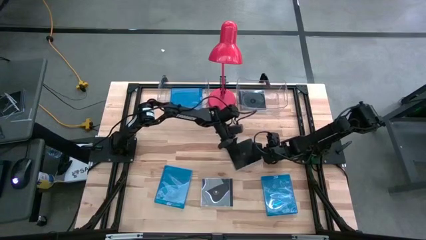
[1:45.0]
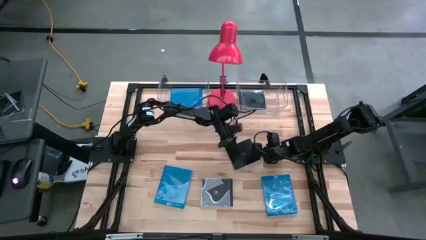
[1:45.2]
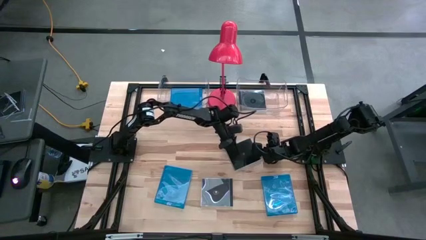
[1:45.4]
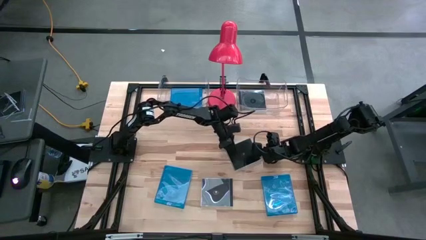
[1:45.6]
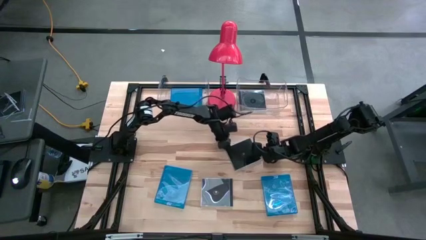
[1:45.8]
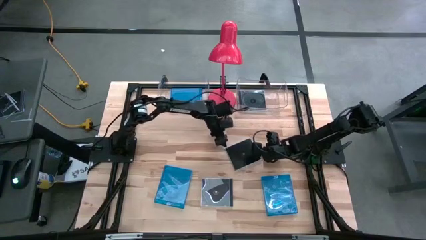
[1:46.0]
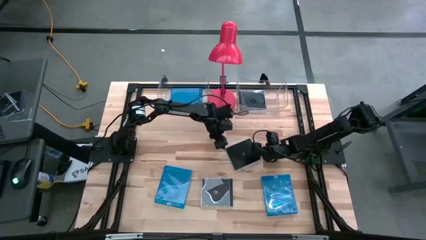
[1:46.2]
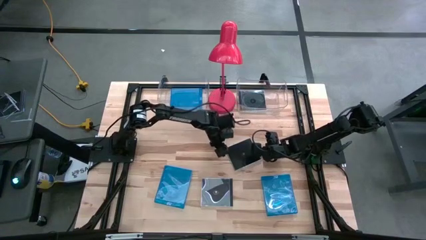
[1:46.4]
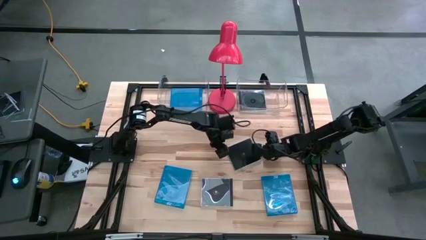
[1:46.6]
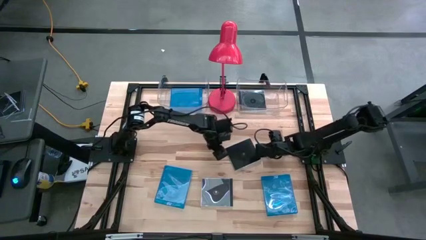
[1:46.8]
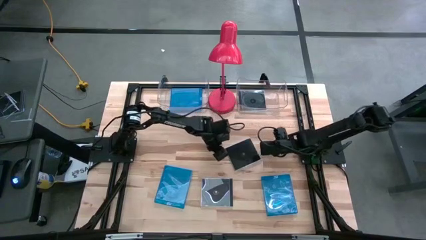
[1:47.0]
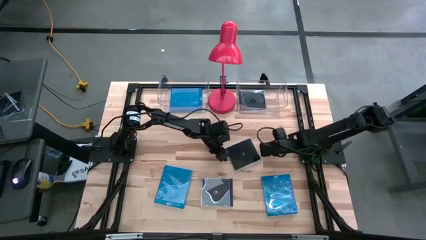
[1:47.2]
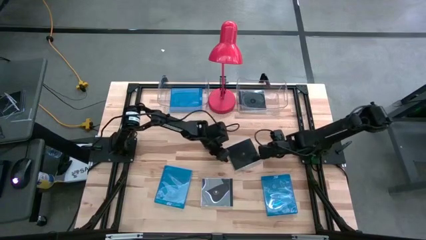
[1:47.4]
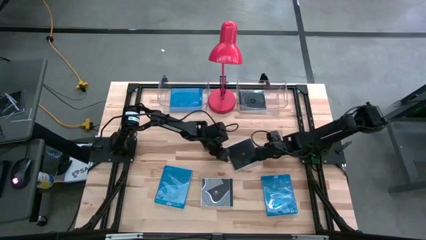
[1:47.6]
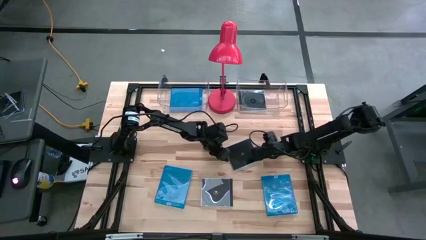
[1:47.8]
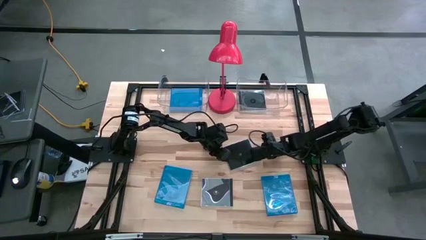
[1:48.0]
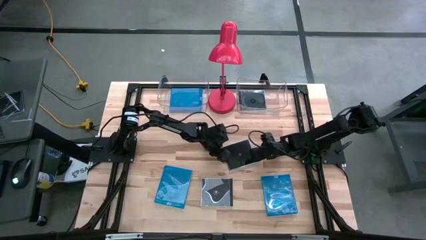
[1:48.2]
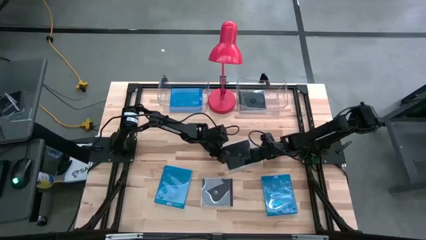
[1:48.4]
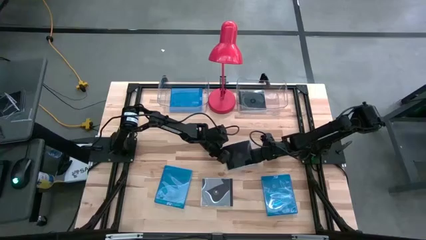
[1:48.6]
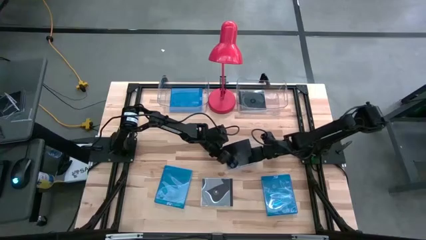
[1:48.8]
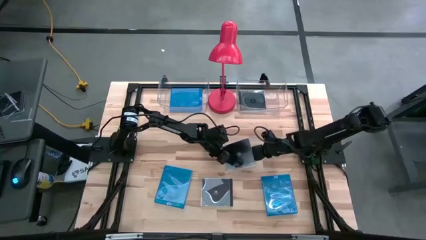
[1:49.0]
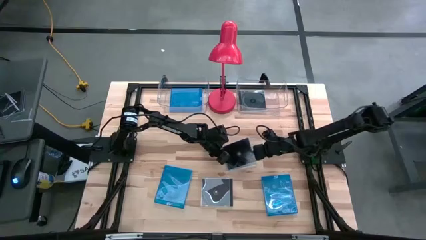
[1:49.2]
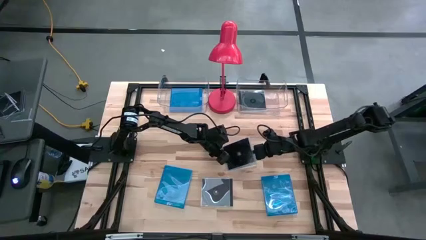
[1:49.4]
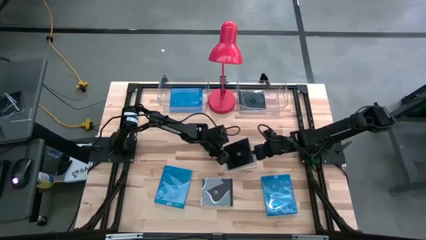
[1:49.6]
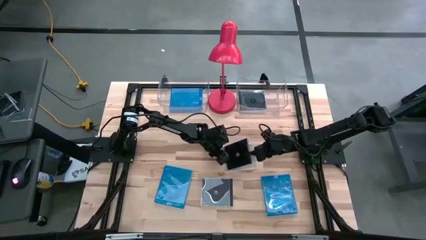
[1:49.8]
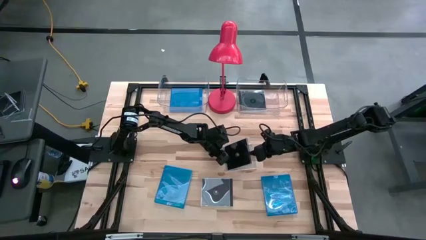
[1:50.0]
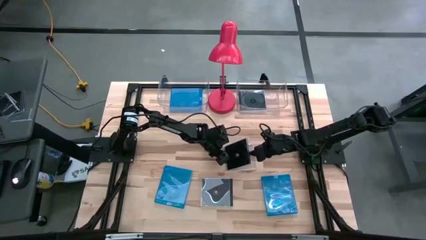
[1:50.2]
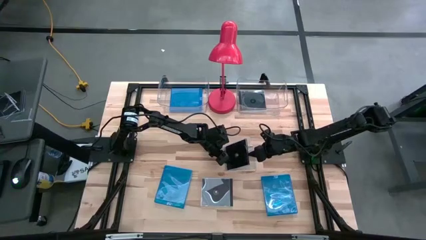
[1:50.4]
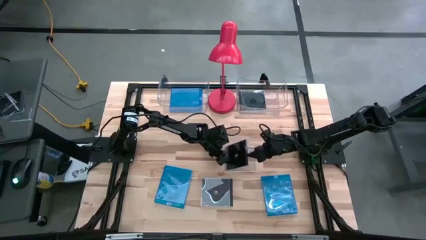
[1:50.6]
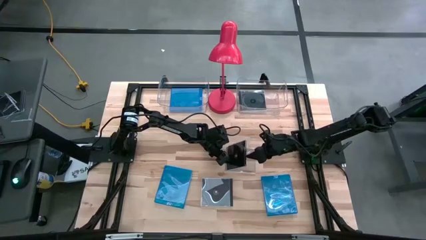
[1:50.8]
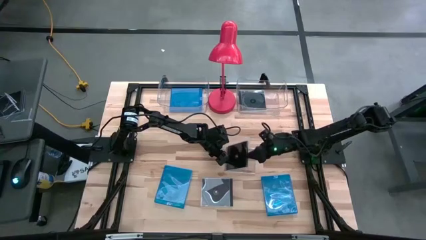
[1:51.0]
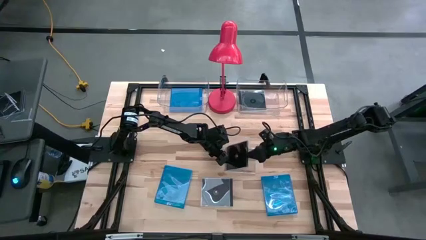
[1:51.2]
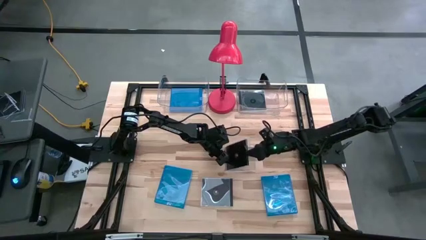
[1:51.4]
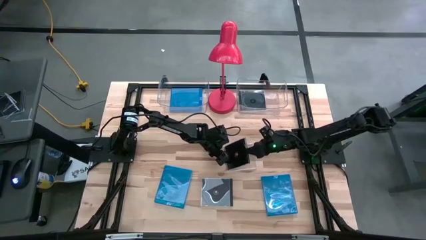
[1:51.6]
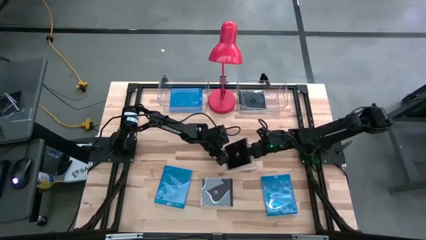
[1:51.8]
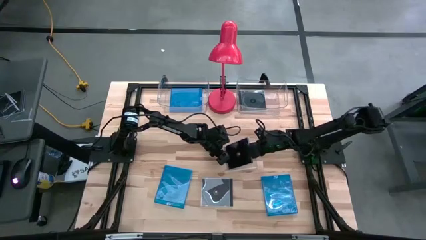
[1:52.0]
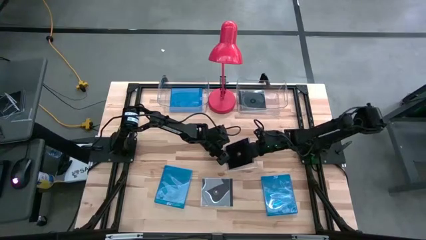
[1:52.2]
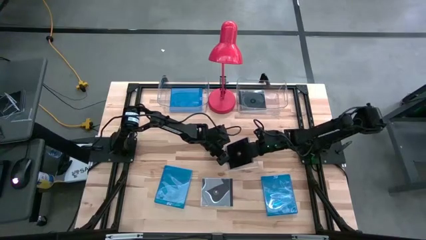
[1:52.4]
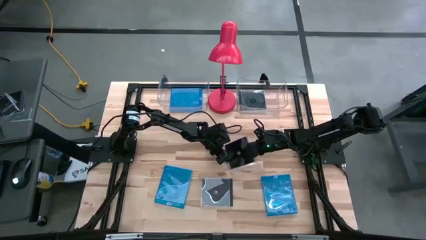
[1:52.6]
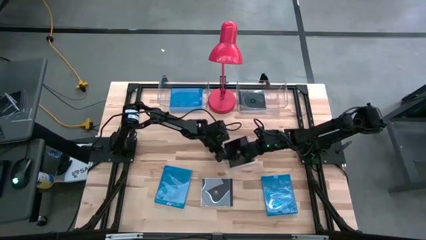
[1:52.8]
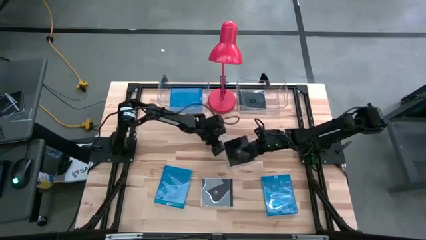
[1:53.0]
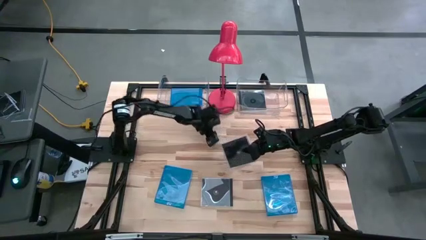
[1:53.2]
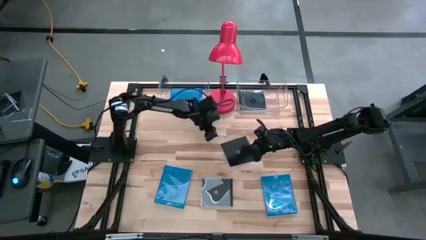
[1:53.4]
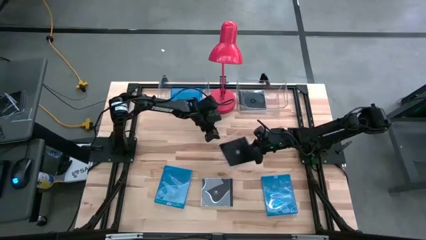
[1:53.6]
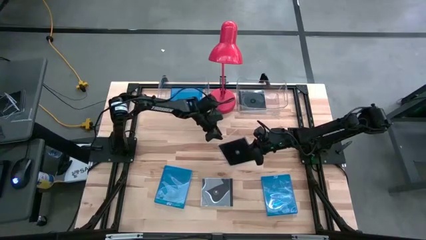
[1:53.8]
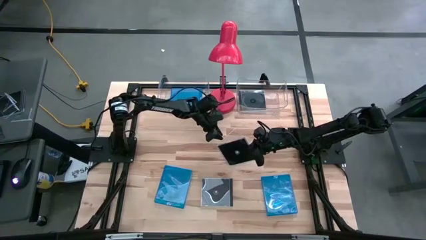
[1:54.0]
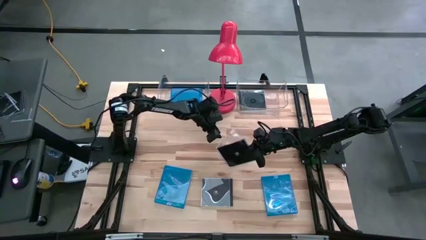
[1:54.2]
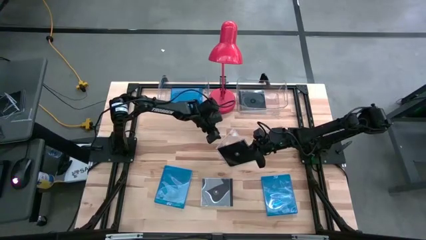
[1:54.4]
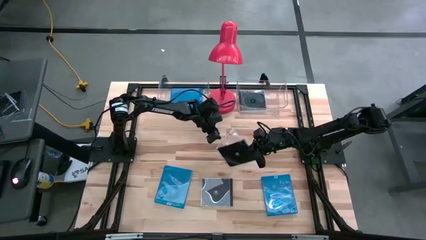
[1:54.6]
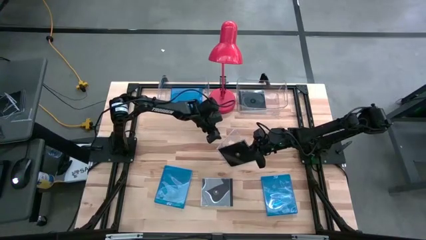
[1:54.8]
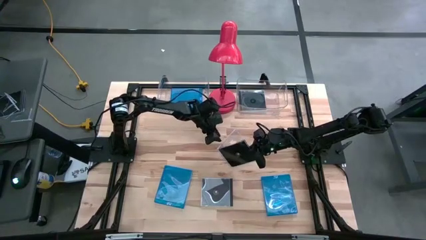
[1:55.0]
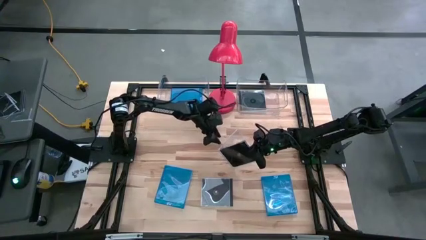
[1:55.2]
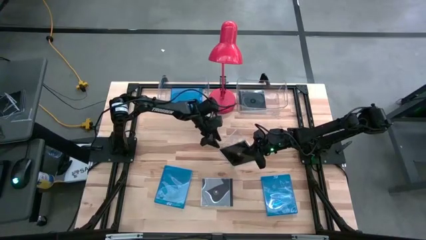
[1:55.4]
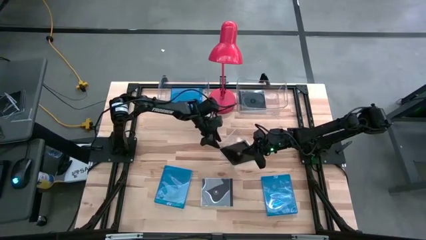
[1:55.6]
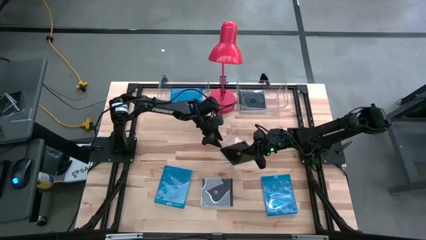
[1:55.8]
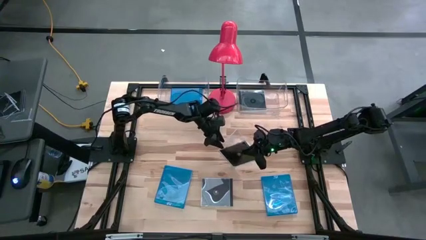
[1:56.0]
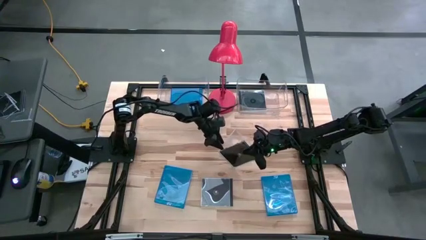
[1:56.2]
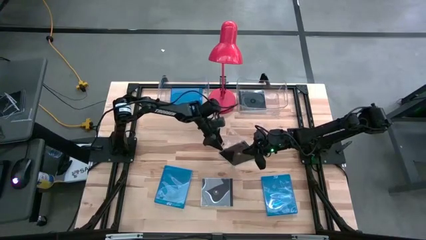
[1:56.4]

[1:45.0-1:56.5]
Task: Pick & place jewel cases by type
Put the right black cd case into the right transparent bin

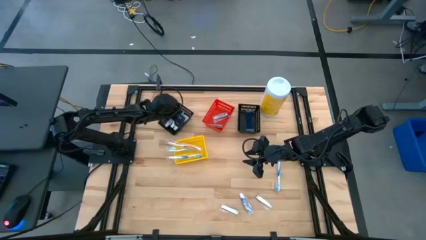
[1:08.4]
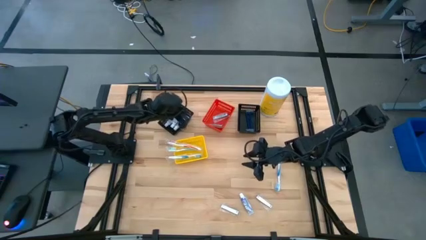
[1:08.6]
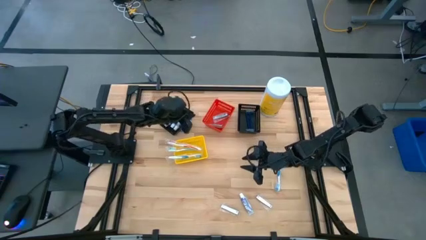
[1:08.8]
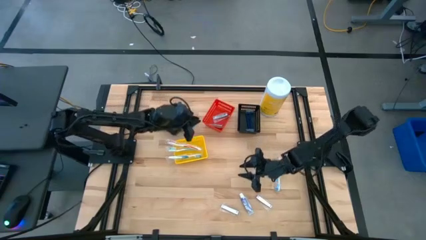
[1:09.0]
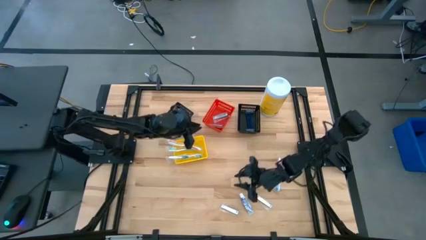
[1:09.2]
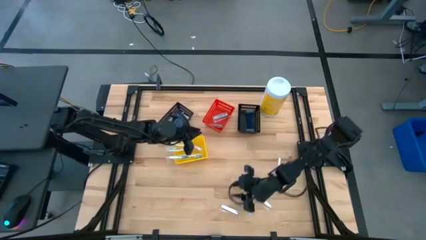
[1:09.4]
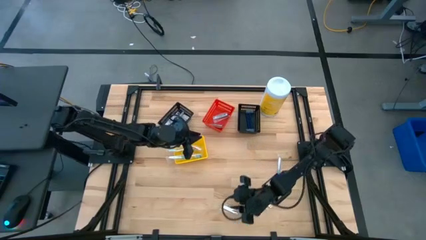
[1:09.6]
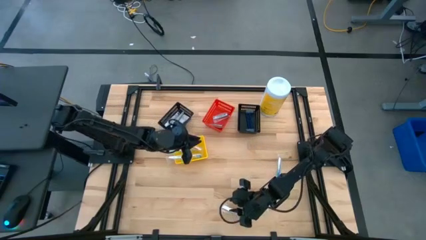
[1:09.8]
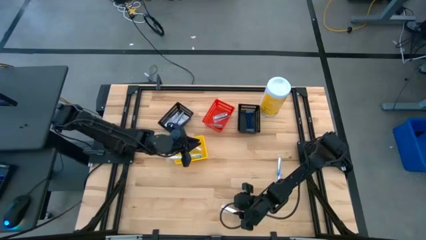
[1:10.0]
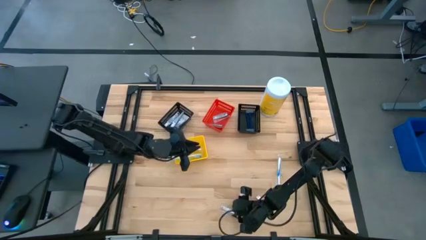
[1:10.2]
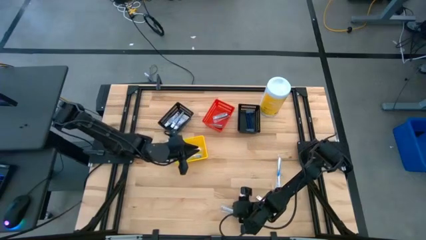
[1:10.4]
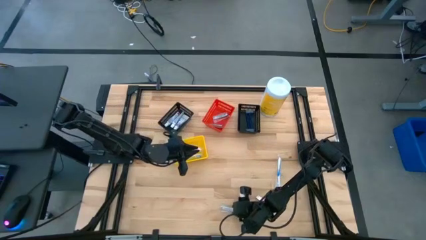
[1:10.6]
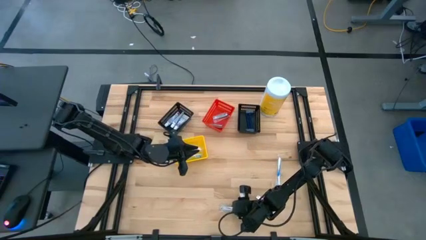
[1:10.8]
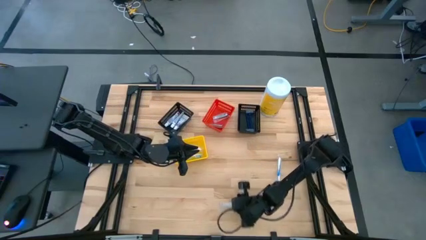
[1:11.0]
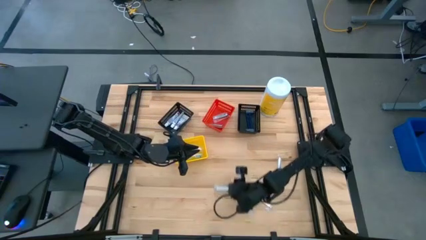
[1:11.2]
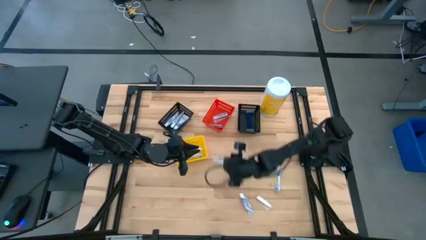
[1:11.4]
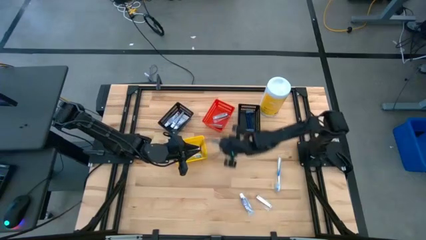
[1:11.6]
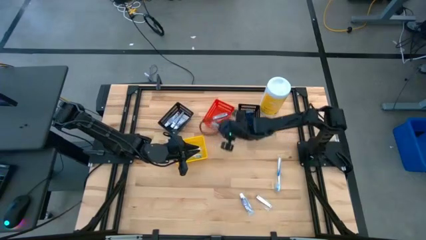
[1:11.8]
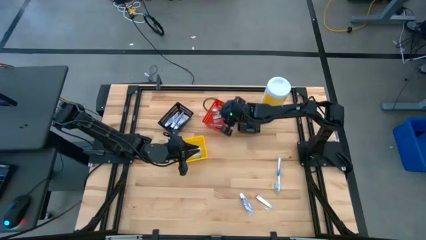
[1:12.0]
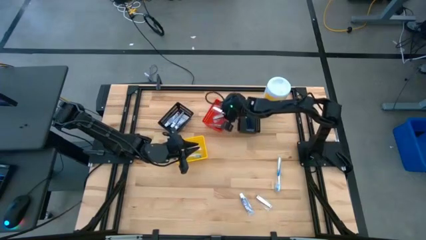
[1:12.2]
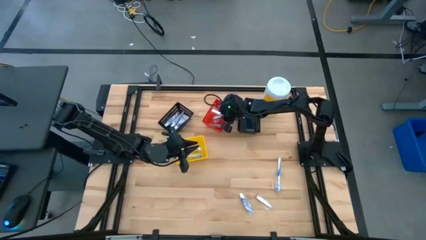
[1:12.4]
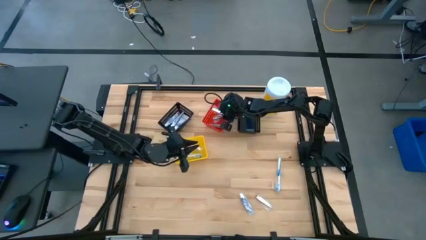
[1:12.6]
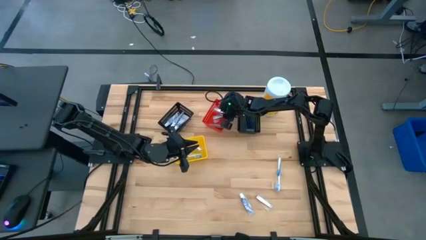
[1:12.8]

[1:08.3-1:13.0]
Task: Pick & Place Travel size toiletries
Put the left silver nail cutter into the red bin
